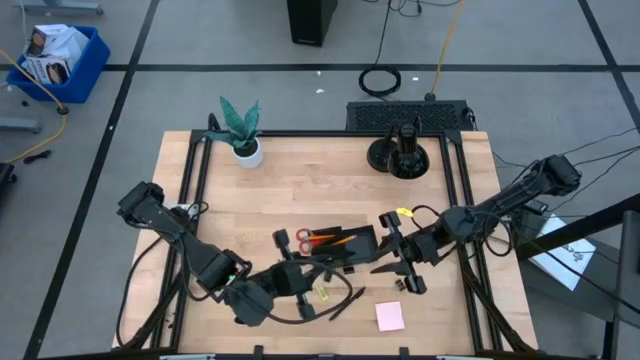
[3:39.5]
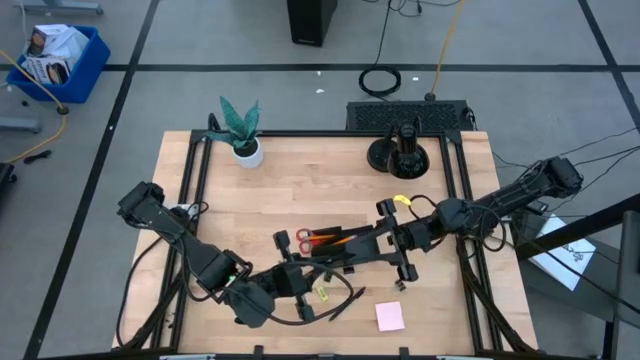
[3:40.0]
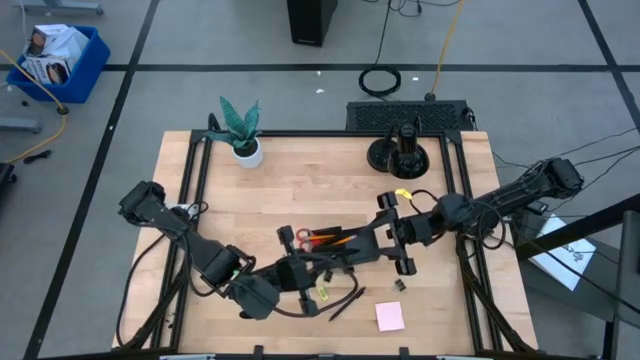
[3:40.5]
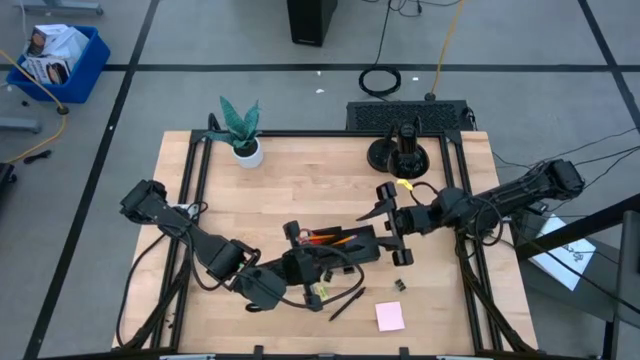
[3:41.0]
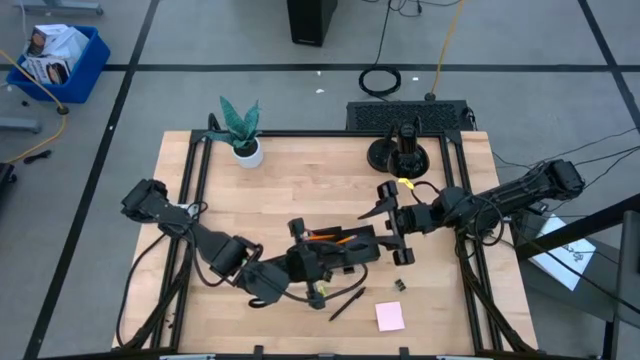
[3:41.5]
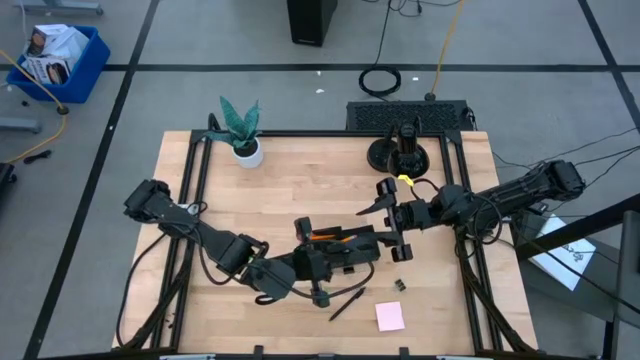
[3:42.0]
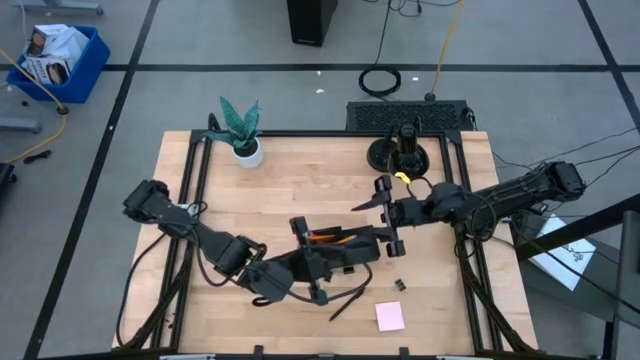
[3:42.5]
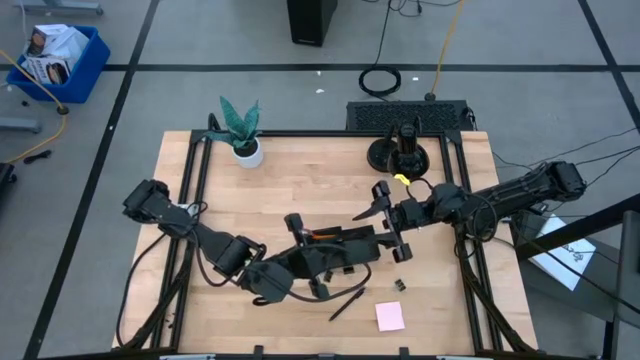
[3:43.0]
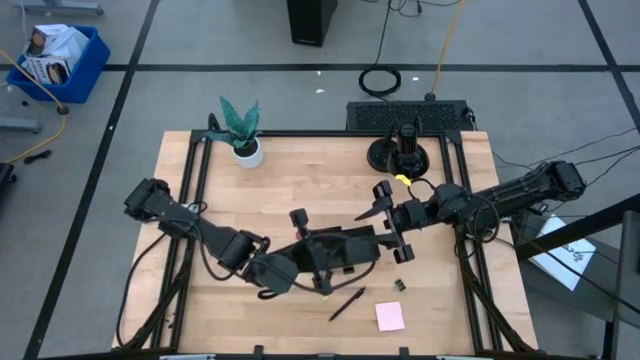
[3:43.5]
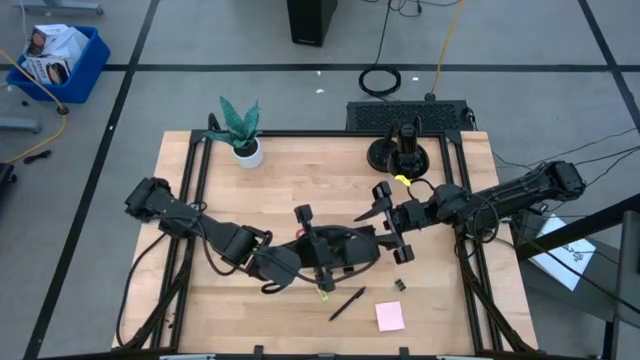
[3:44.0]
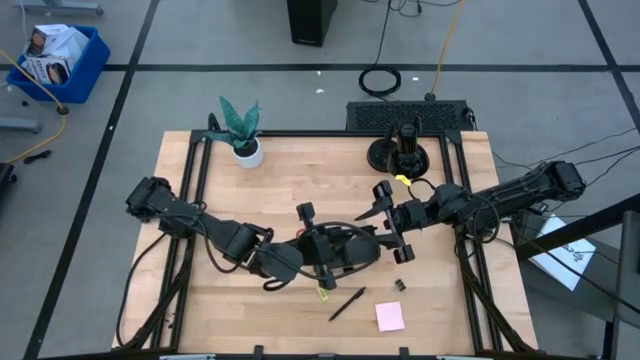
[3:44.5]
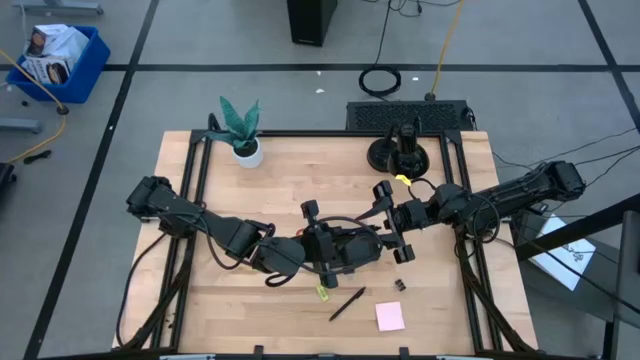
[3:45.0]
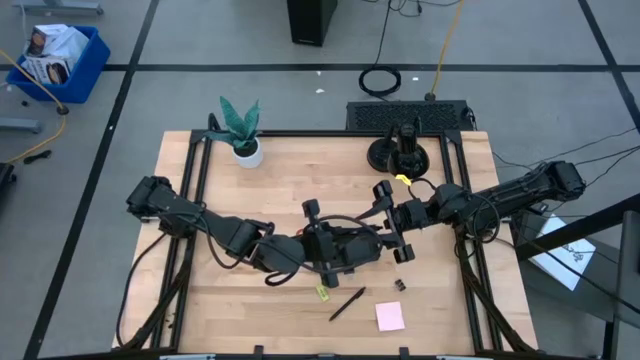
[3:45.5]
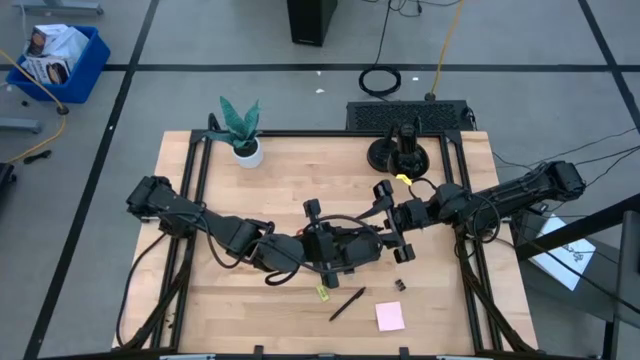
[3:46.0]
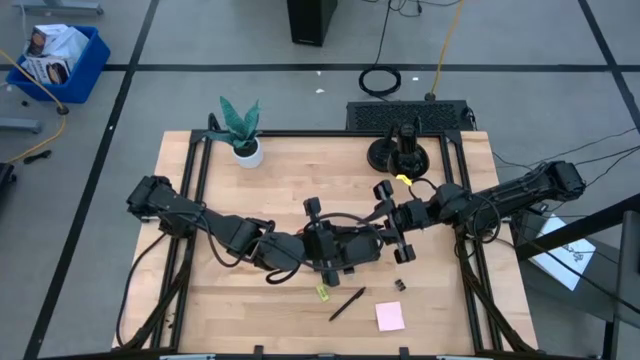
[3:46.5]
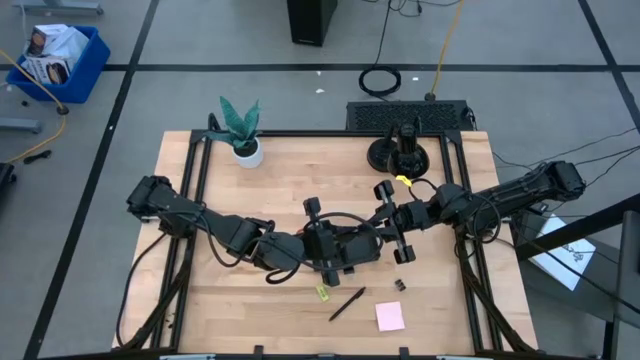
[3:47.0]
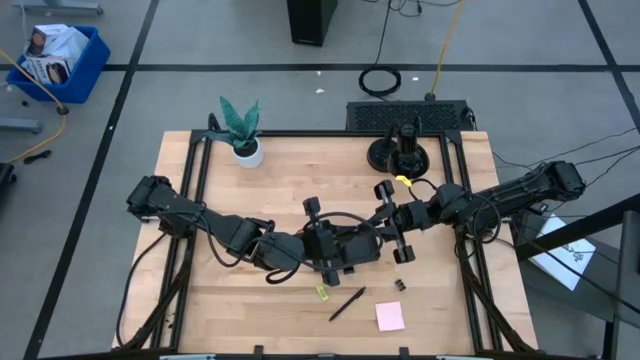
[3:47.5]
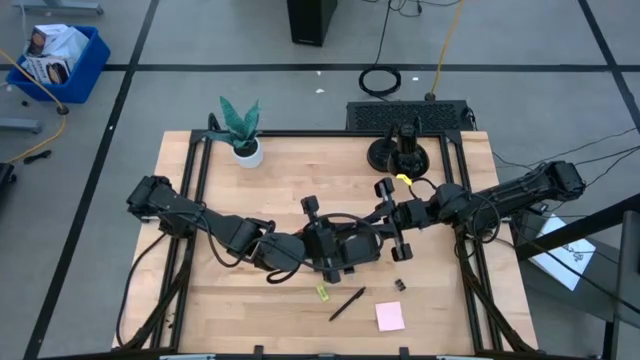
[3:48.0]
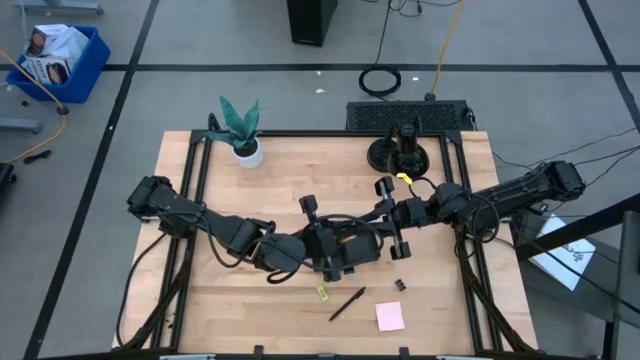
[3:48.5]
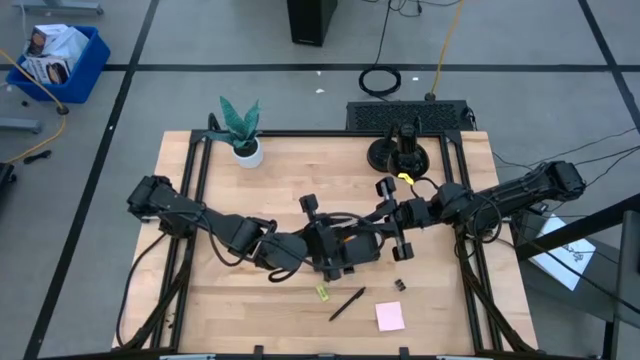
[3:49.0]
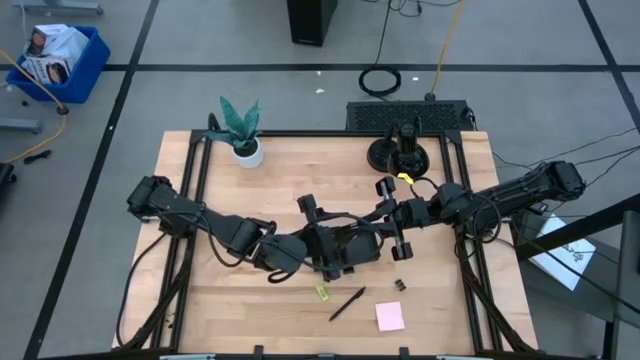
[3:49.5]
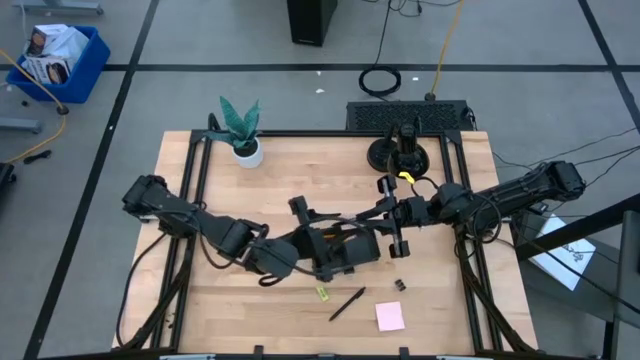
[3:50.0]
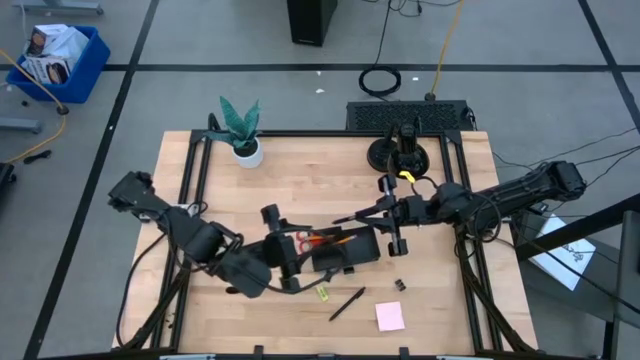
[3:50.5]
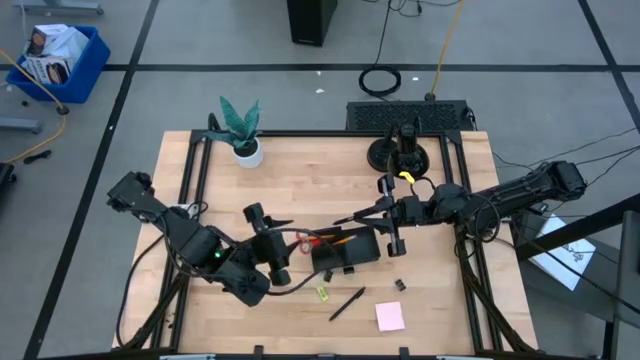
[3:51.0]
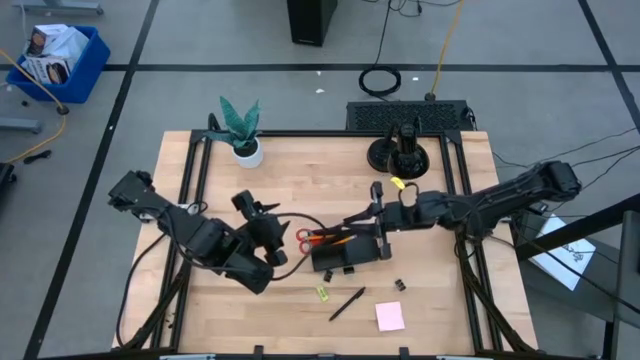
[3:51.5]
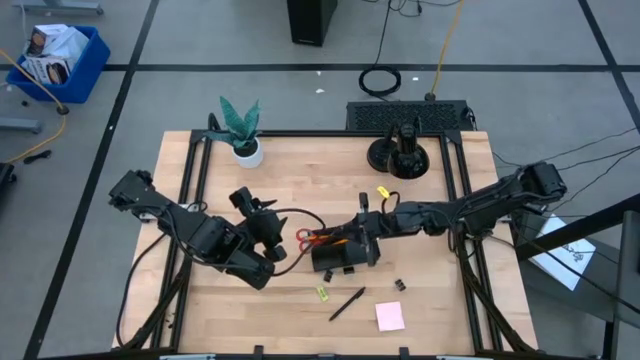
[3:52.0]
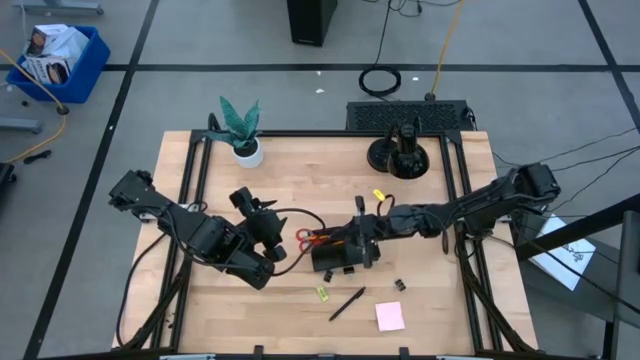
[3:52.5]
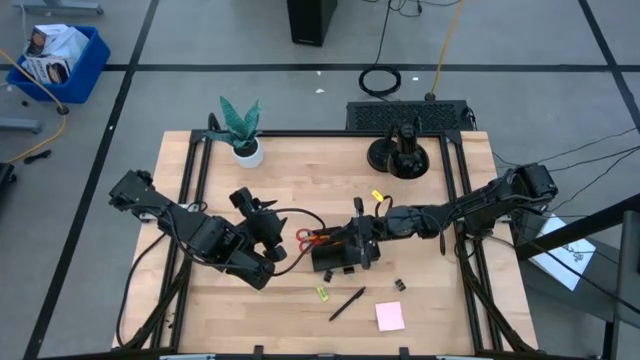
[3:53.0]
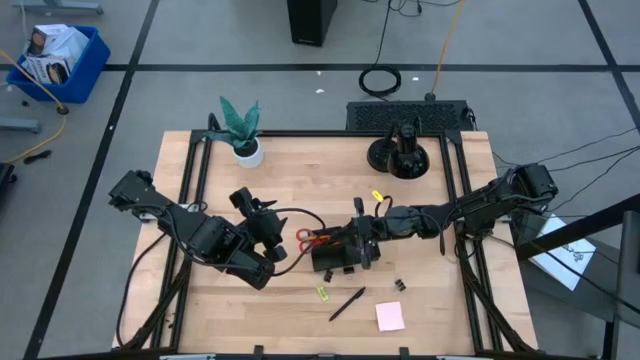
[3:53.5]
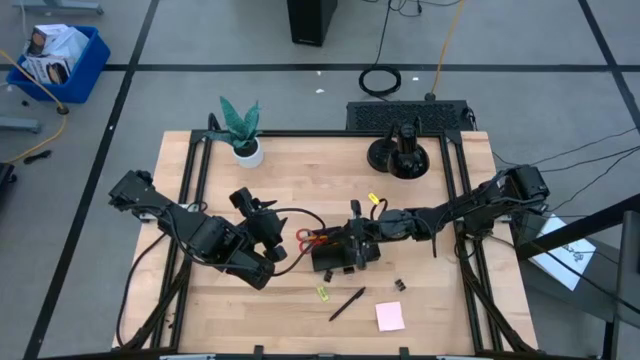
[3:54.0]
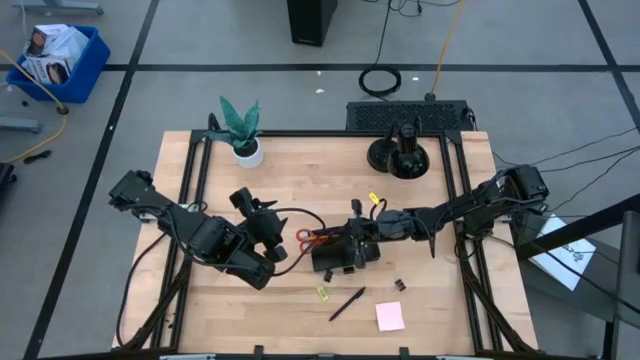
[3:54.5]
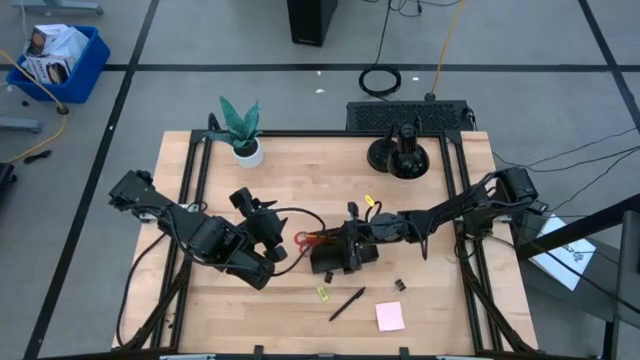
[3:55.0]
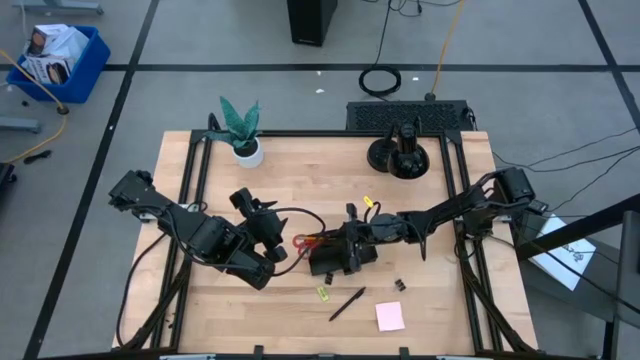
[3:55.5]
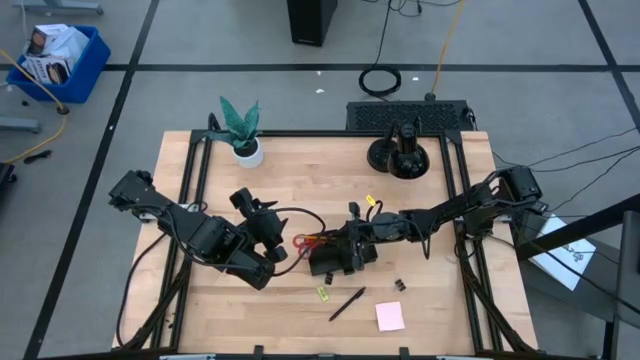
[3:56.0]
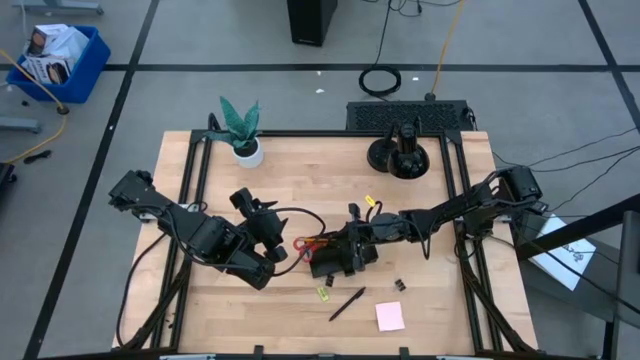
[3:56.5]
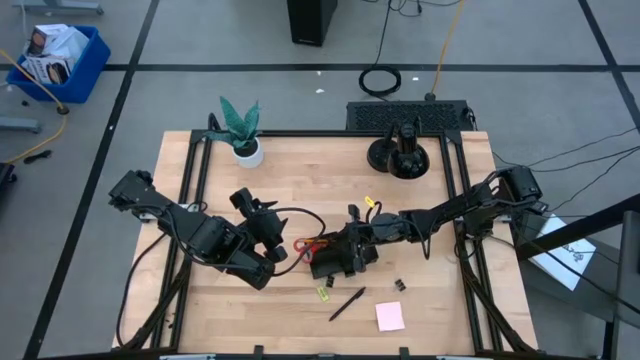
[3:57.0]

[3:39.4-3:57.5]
Task: Pick and place office supplies into organizer
Put the left black pen into the black desk organizer

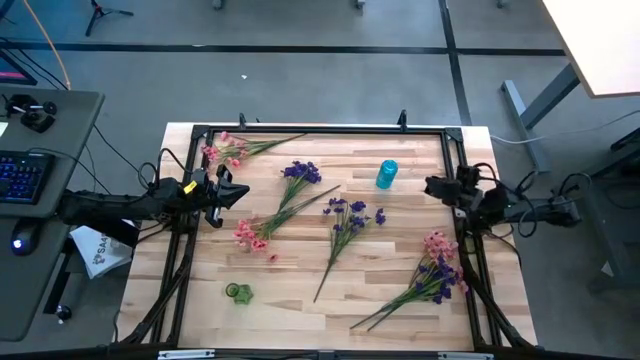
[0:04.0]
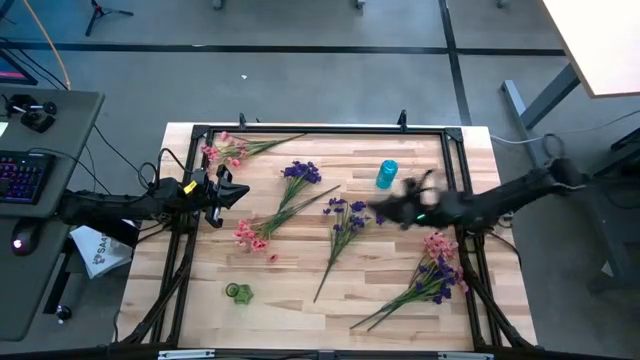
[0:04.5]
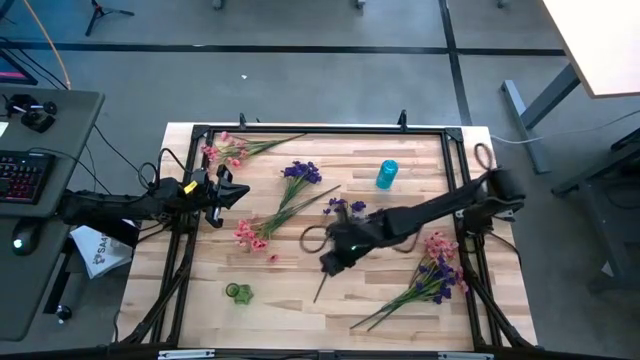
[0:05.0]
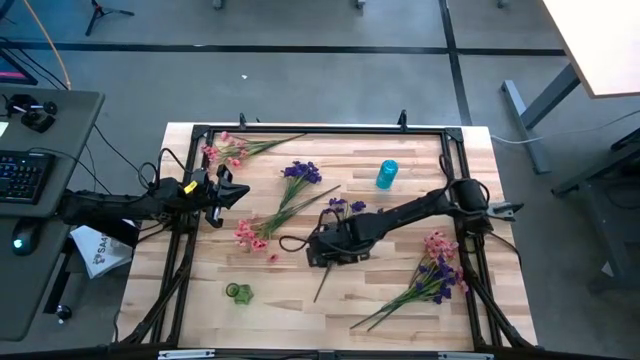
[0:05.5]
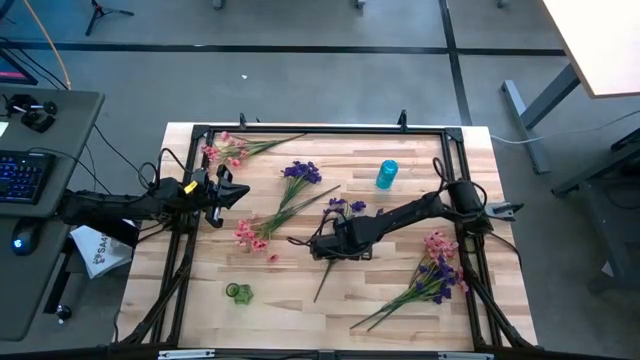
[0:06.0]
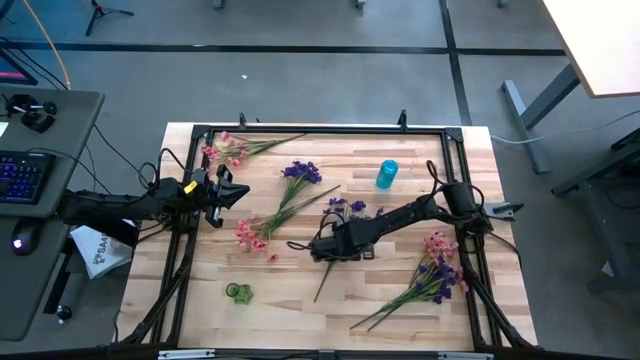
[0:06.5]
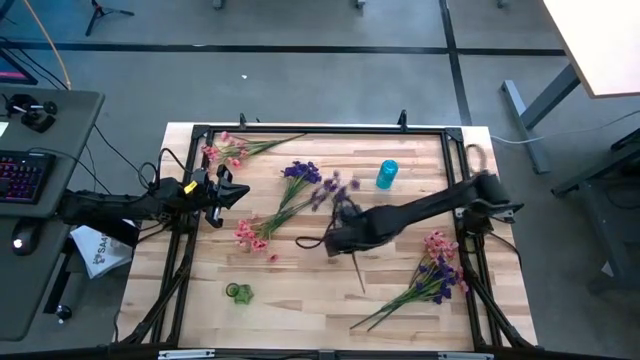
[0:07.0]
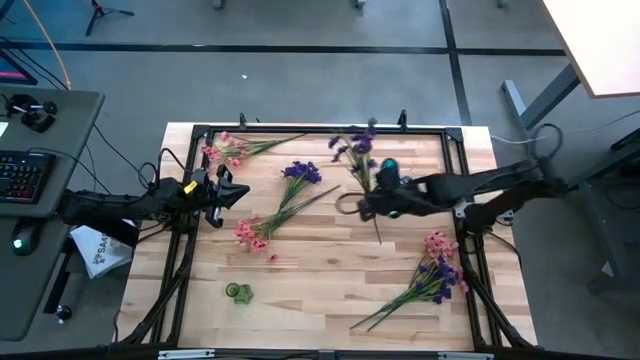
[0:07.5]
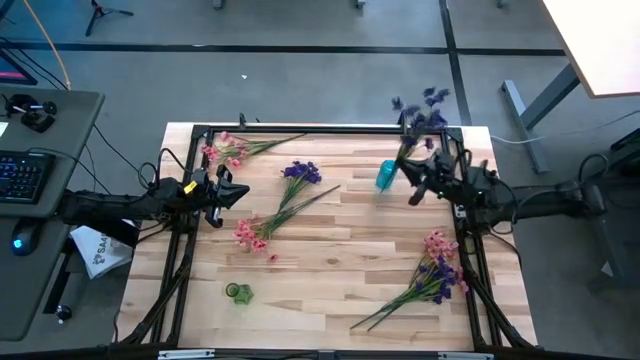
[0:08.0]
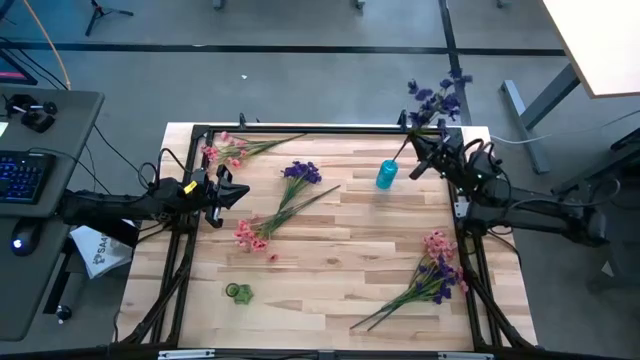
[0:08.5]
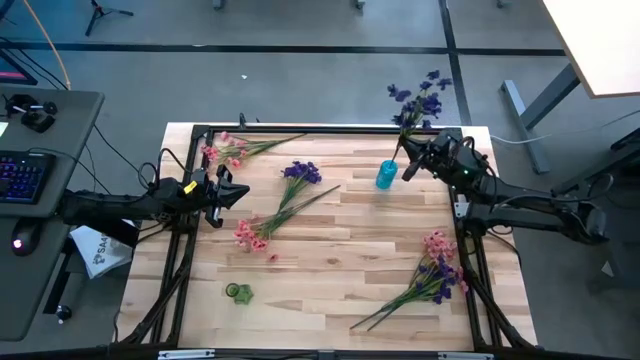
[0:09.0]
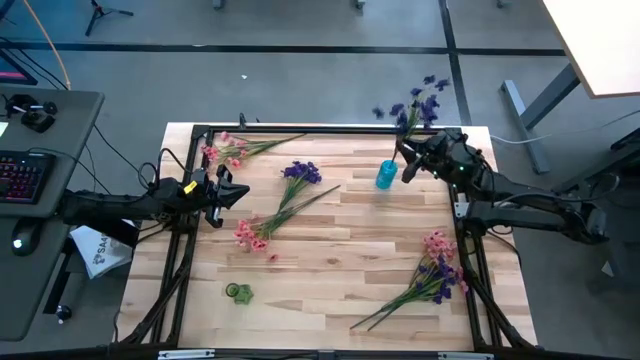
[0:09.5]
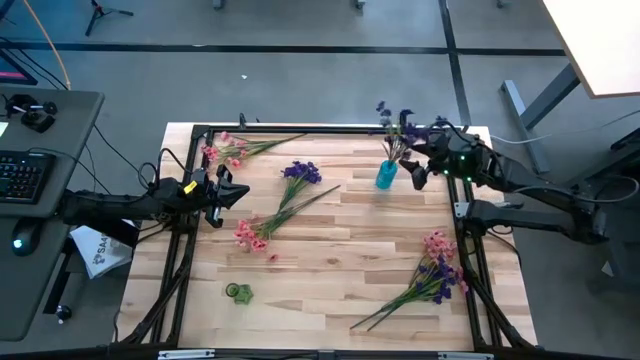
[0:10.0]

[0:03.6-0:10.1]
Task: Sort flowers into vase by color
Put the middle violet flowers into the blue vase
